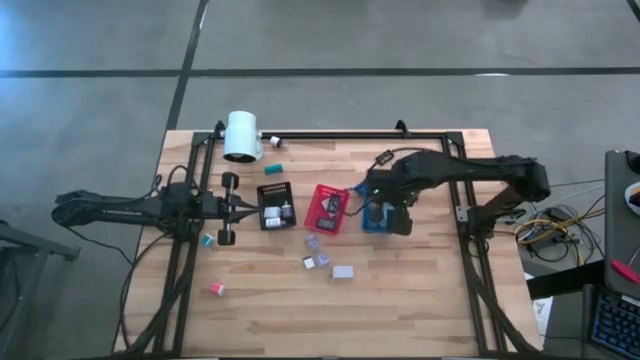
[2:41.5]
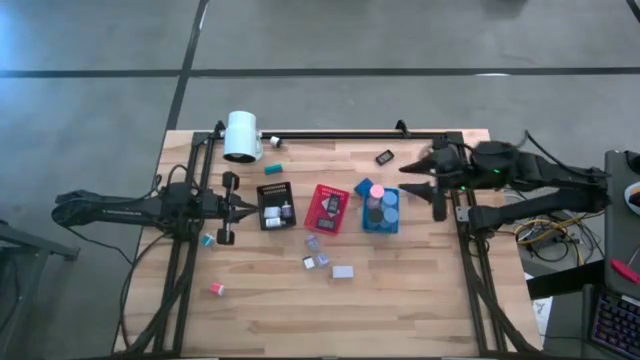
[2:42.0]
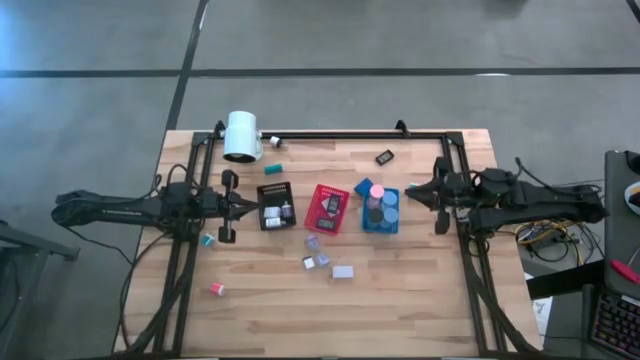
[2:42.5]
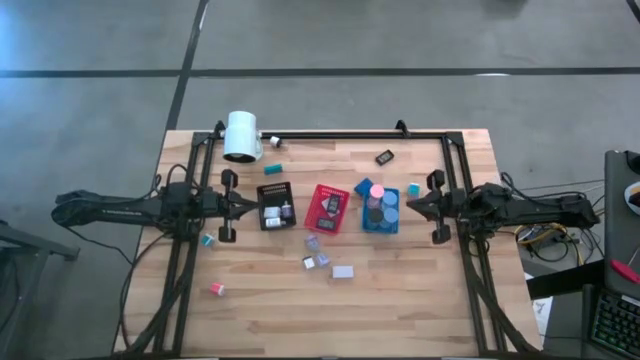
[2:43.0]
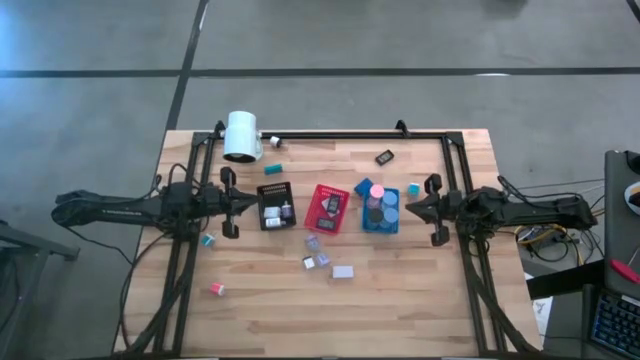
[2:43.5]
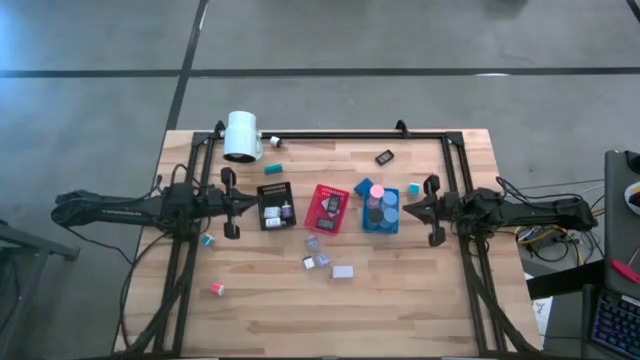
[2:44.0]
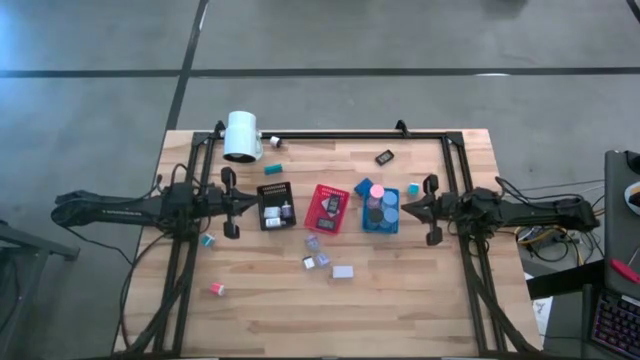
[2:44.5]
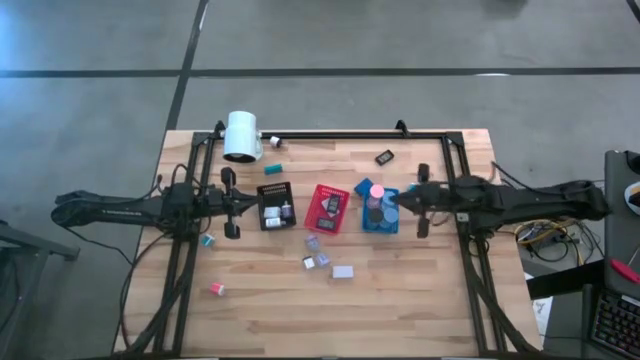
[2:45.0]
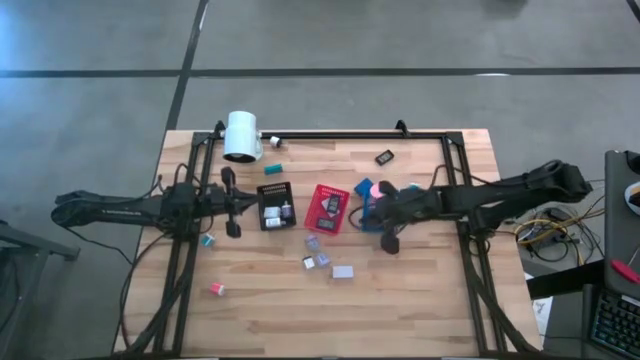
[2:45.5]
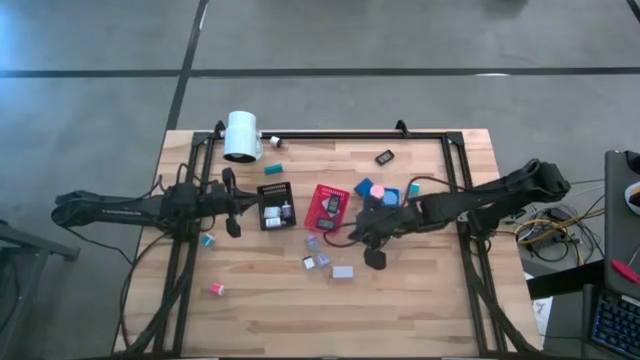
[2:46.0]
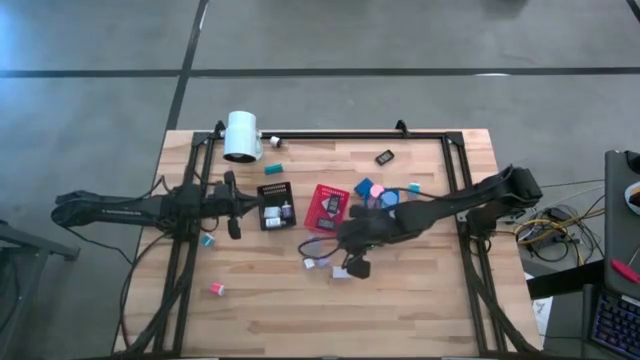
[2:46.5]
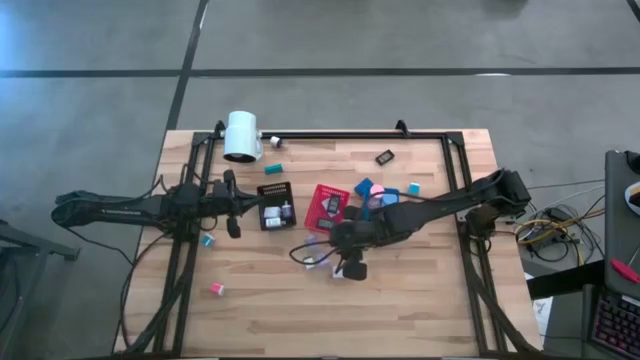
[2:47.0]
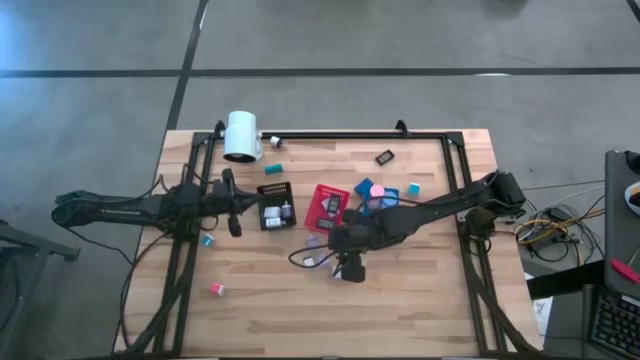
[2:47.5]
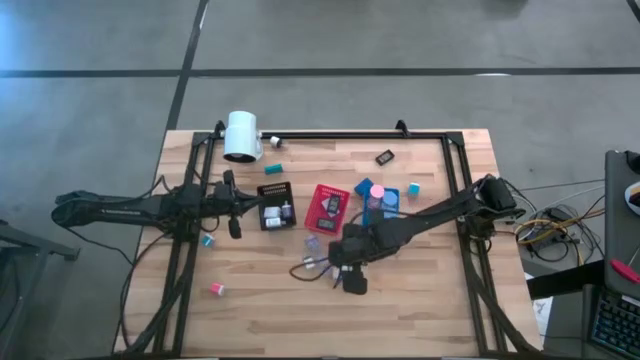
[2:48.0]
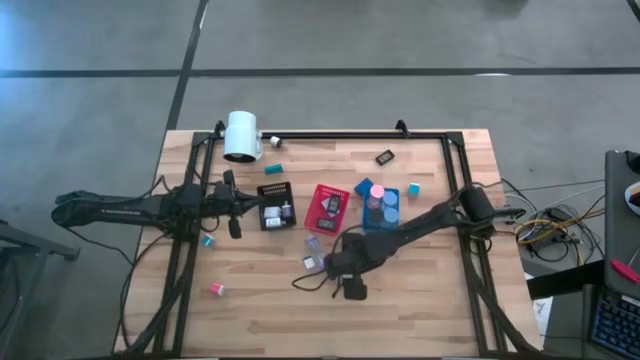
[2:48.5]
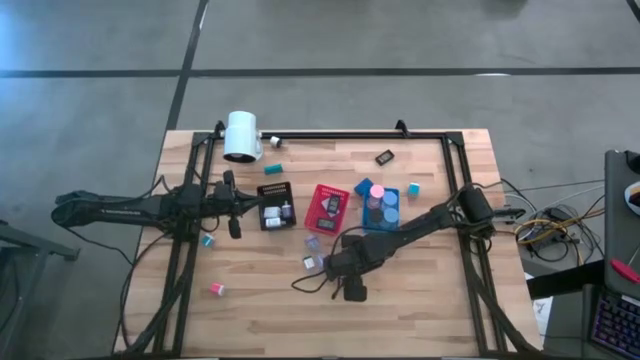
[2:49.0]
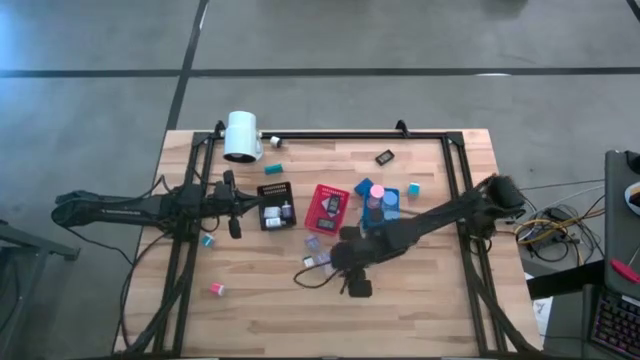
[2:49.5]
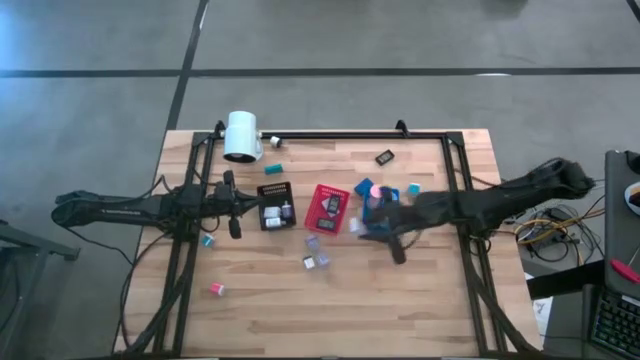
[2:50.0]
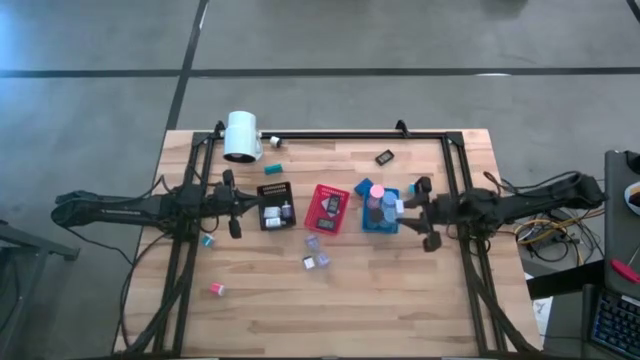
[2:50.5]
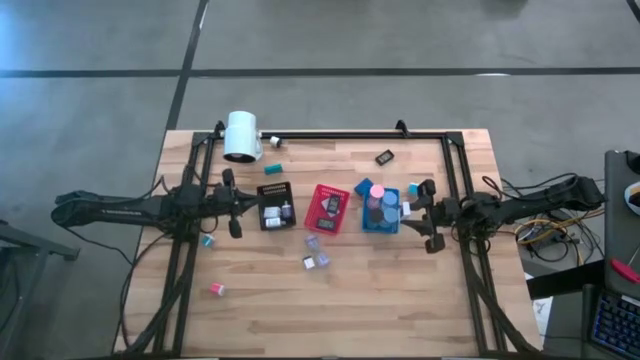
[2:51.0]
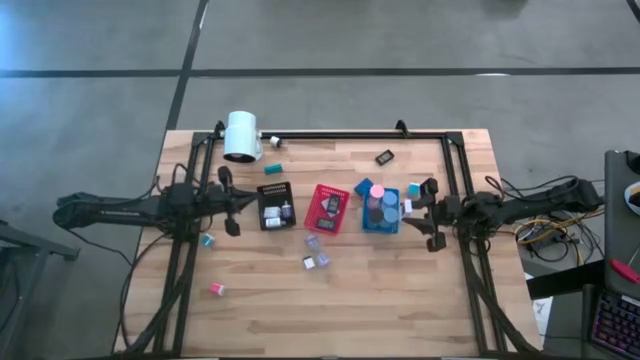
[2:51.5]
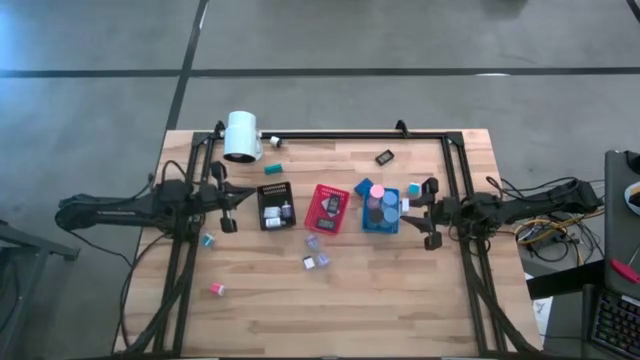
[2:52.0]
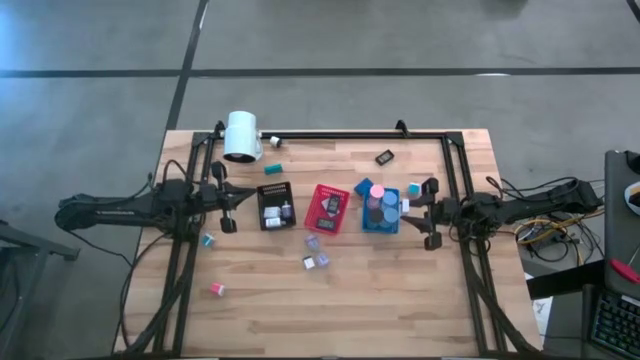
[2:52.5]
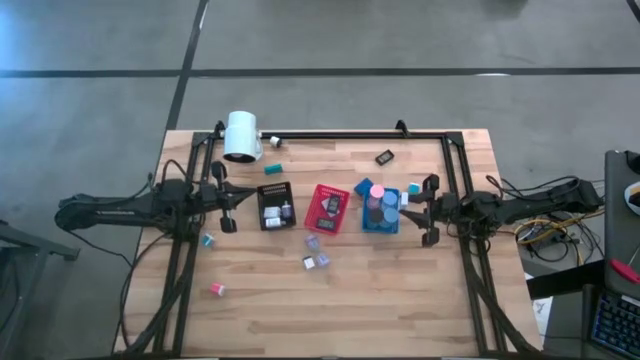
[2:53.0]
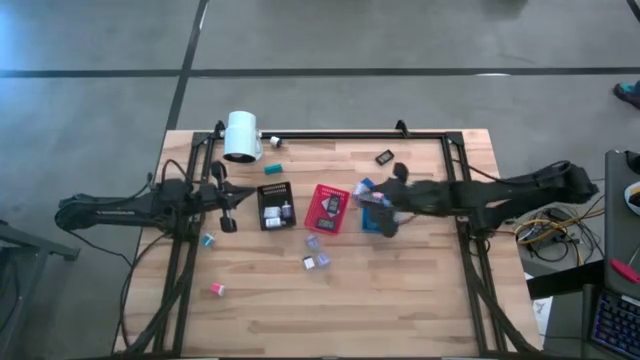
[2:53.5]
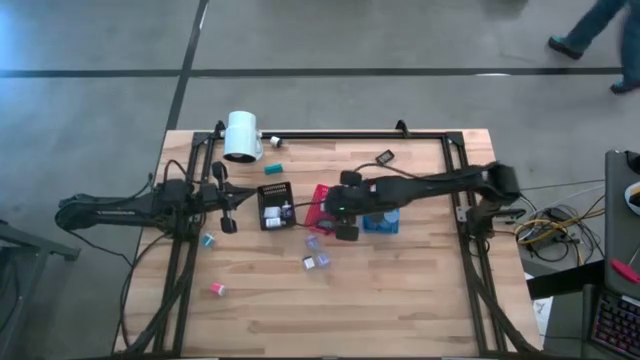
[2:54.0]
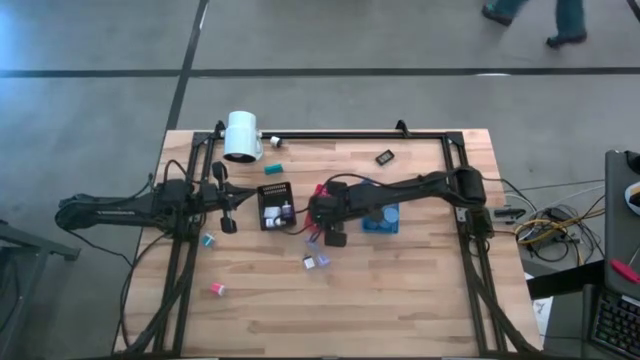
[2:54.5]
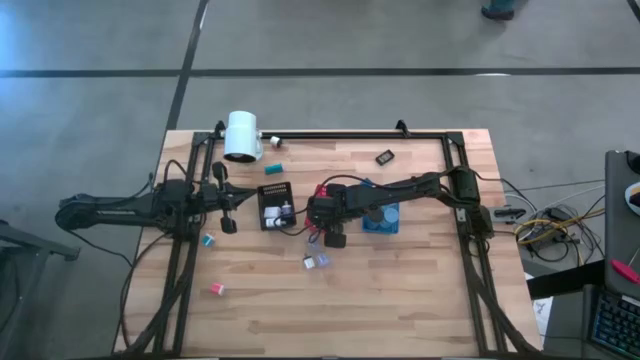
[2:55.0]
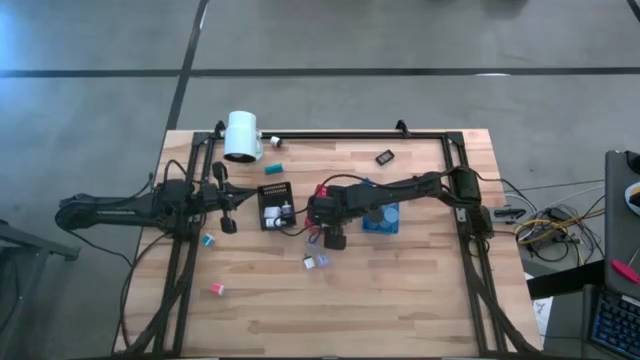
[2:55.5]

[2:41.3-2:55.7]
Task: Pick & Place Office items
Put the white digital clock into the red bin

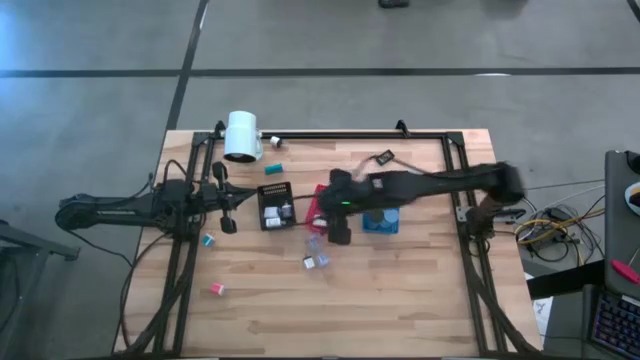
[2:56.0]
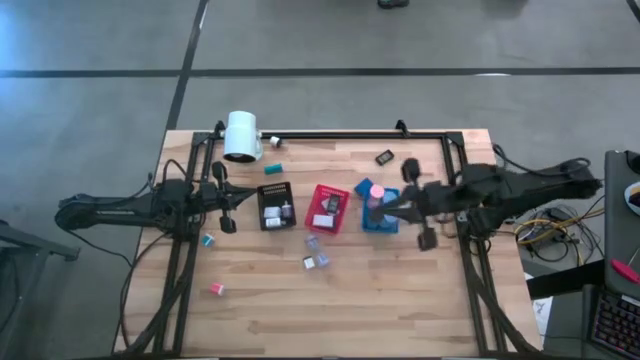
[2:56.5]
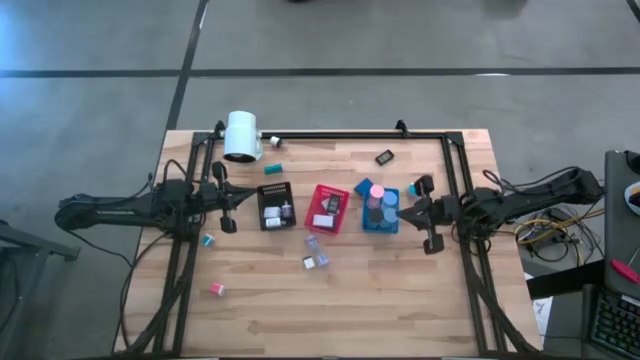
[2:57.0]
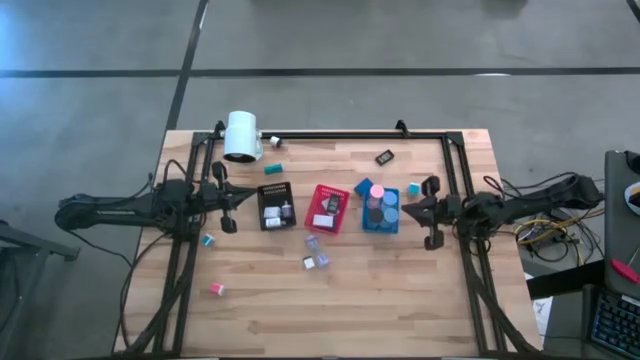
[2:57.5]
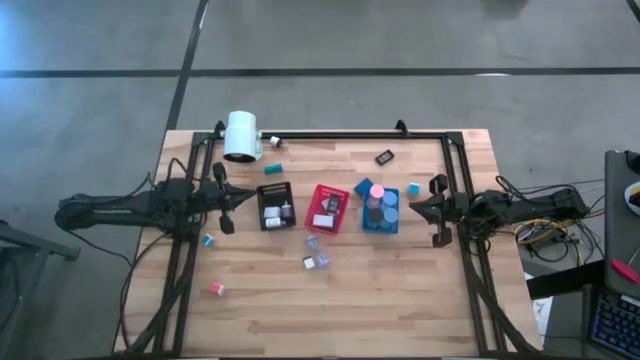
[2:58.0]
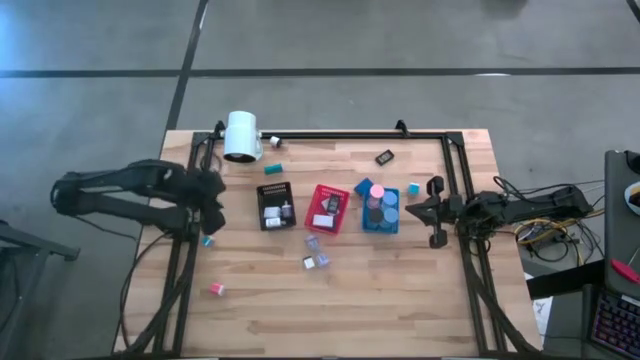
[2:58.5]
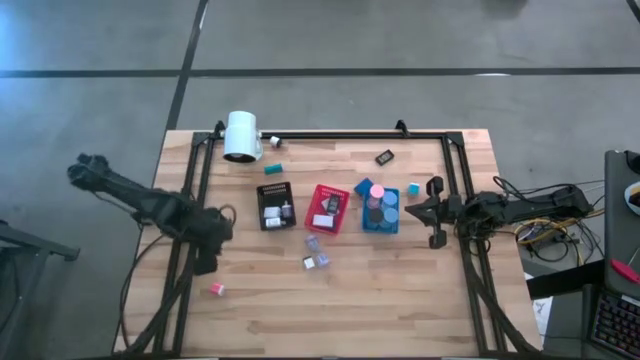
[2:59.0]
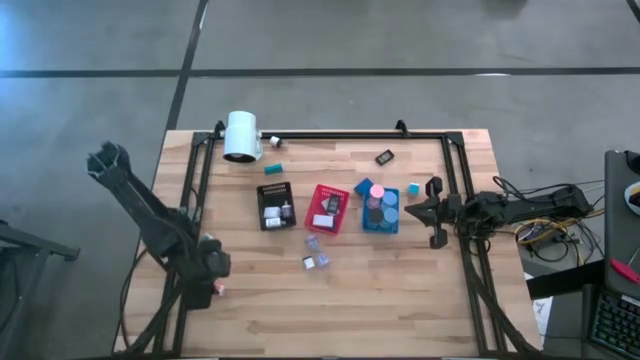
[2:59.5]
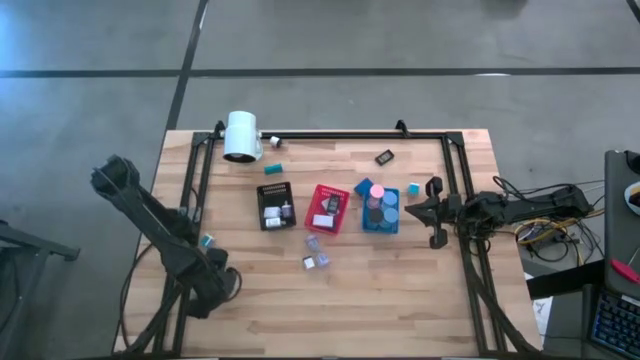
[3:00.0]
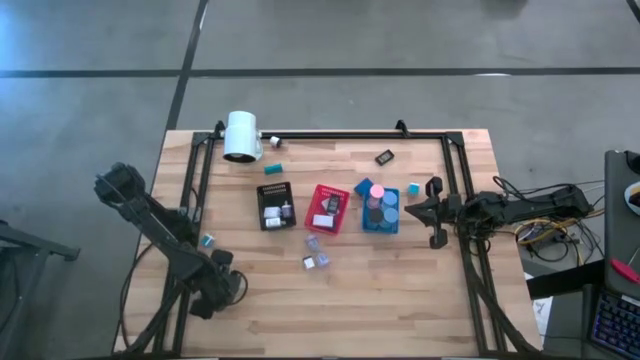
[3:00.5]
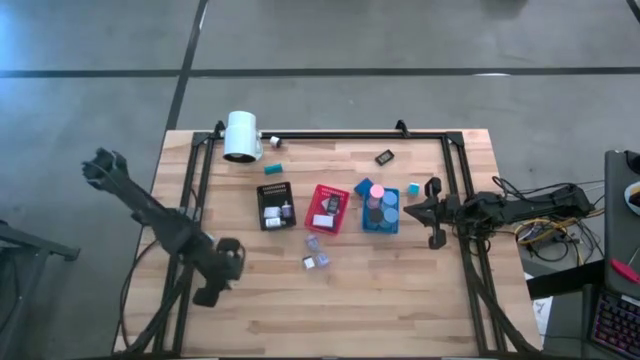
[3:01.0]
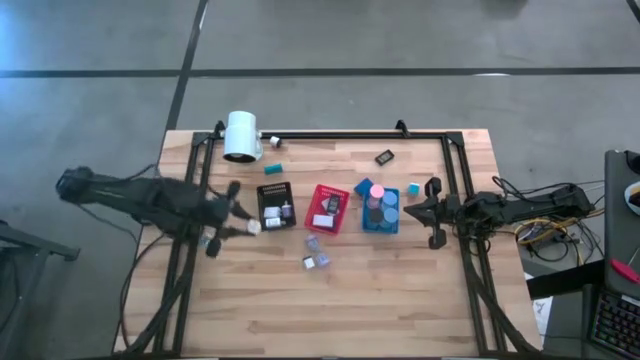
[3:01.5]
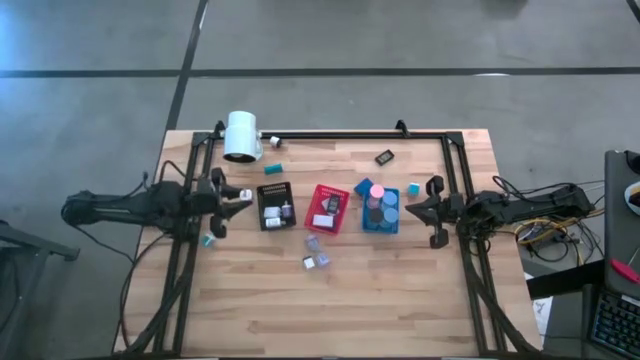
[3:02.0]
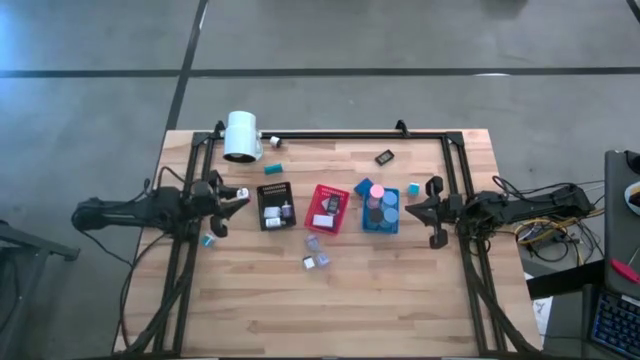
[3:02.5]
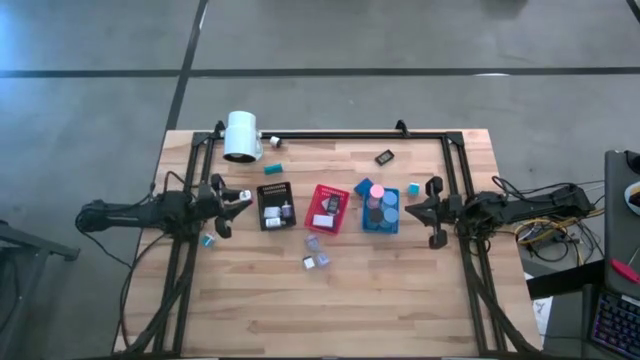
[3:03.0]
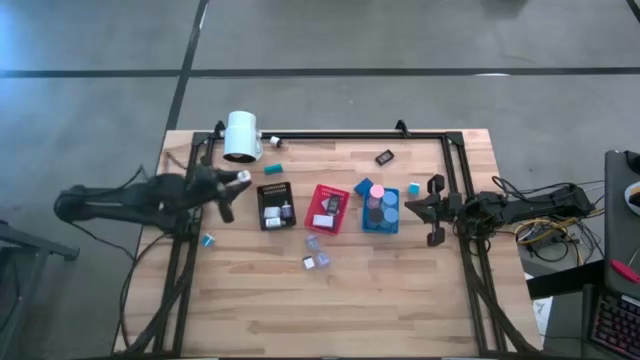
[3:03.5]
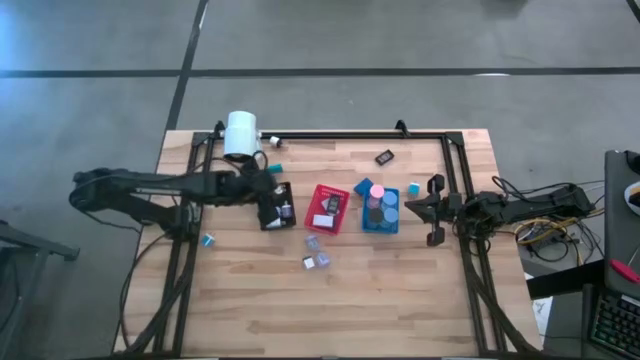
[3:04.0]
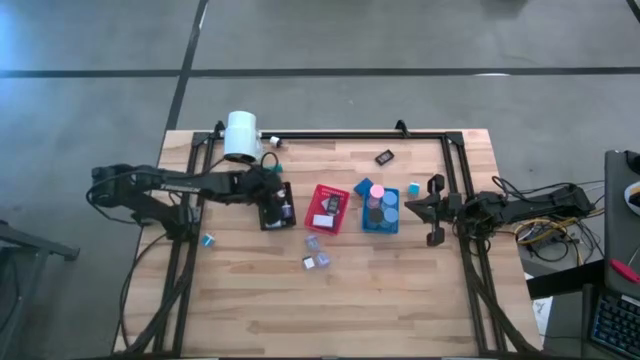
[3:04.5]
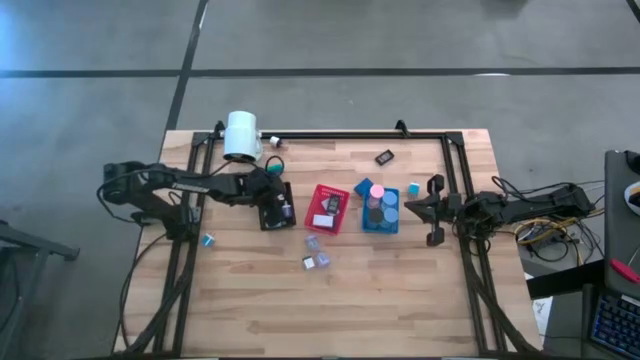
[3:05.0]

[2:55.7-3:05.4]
Put the pink charger adapter into the black basket
